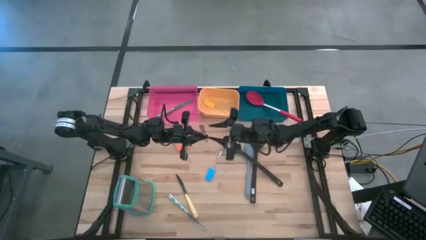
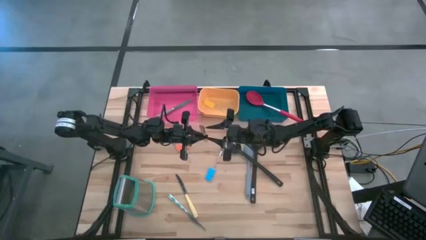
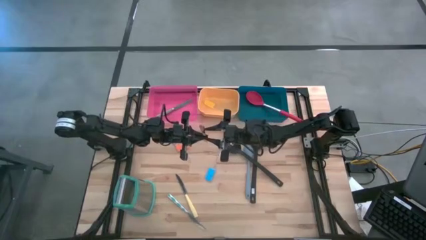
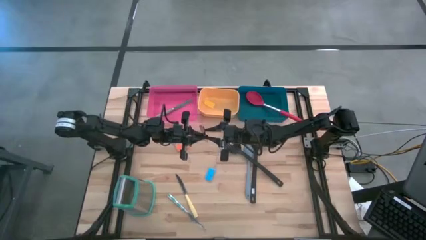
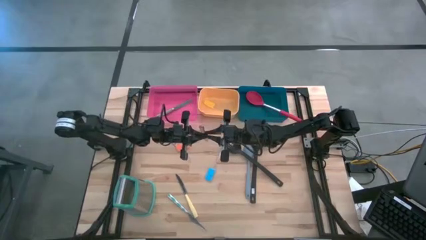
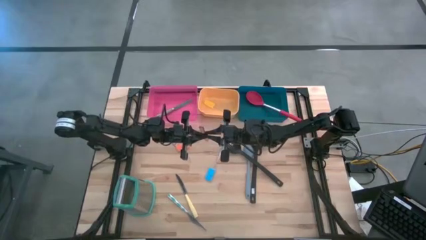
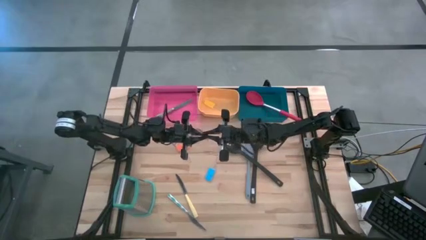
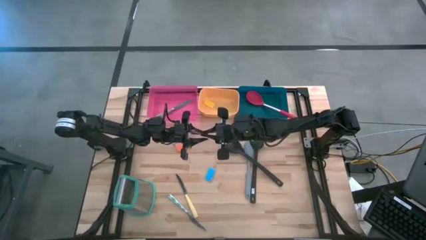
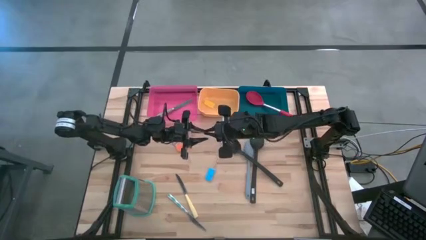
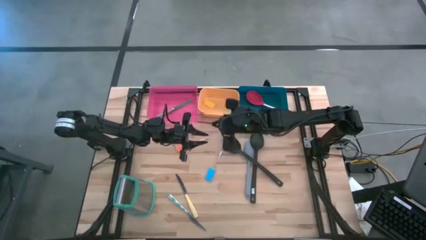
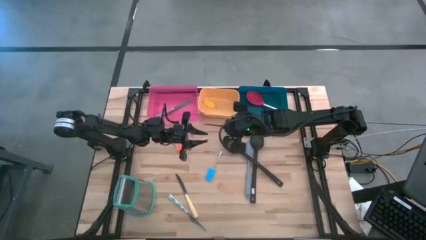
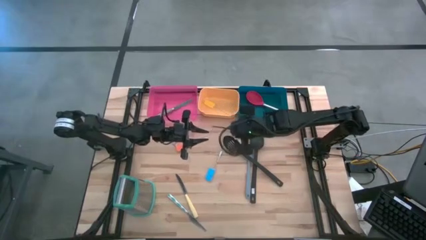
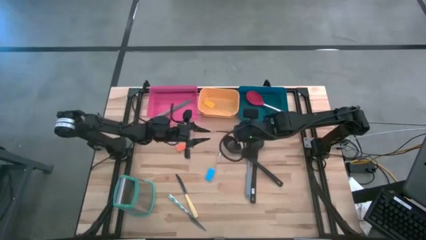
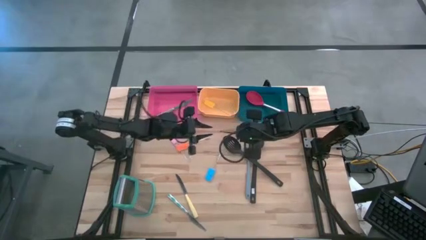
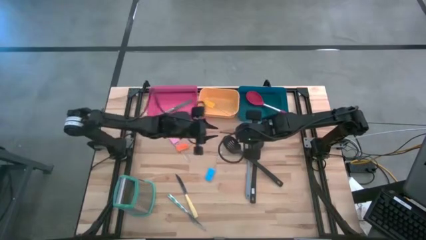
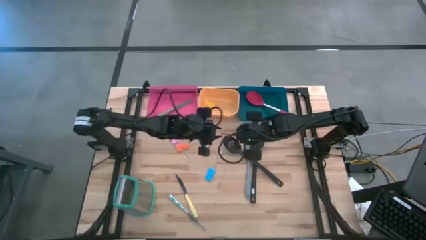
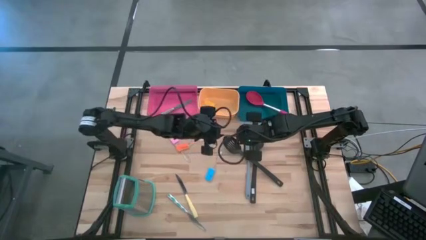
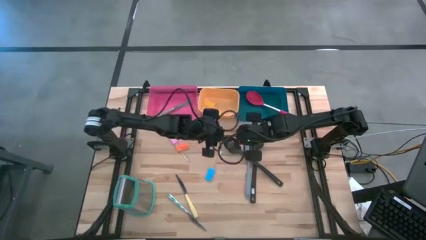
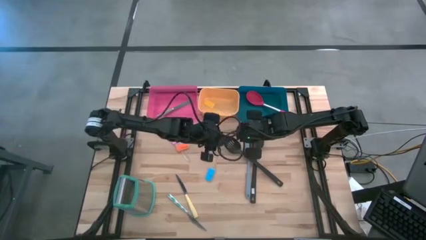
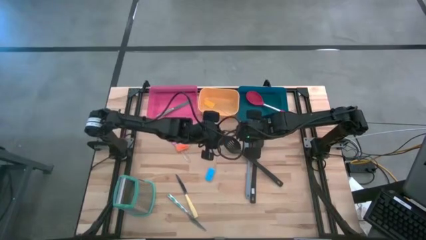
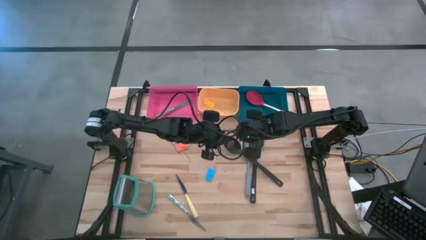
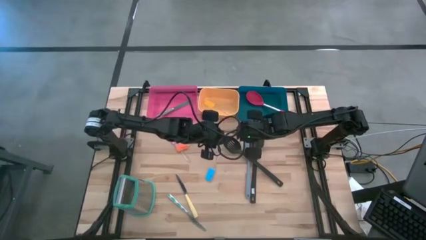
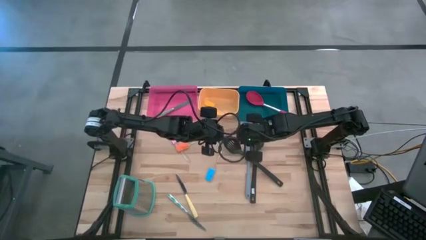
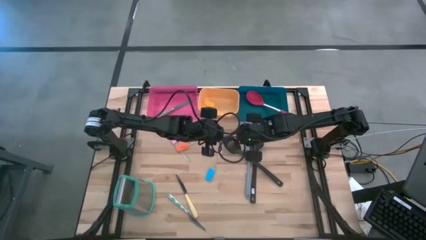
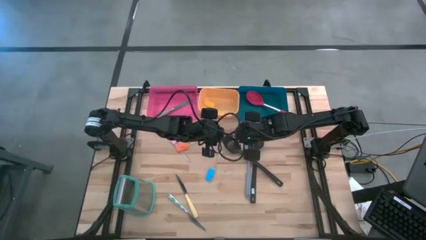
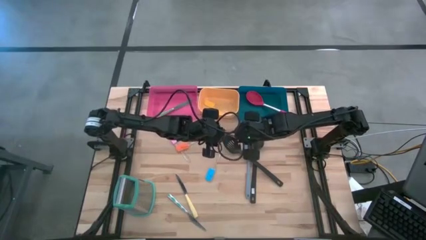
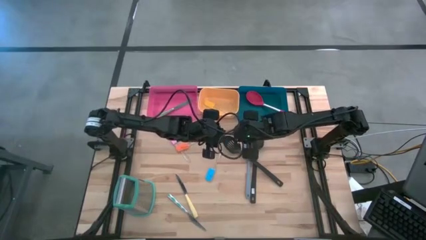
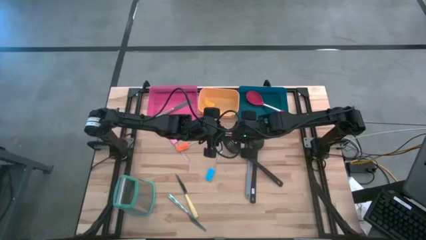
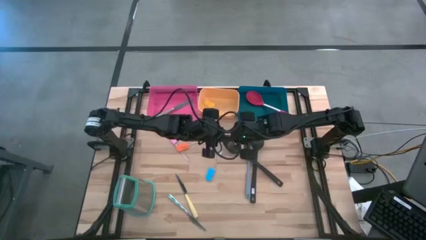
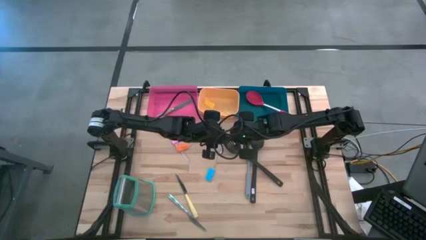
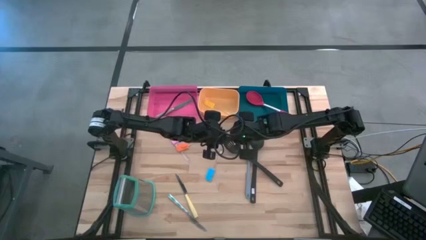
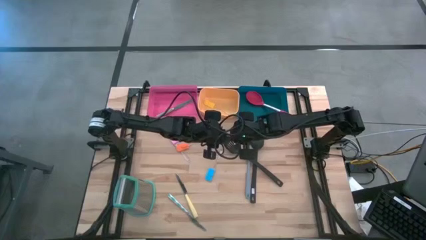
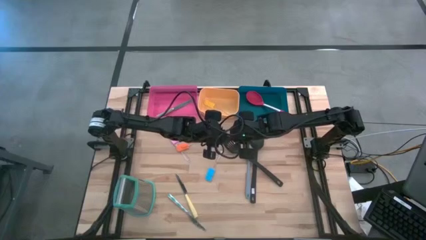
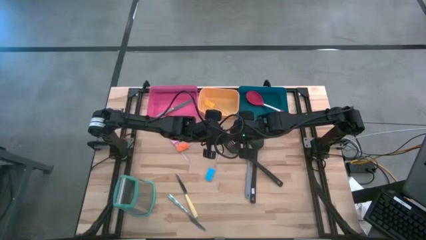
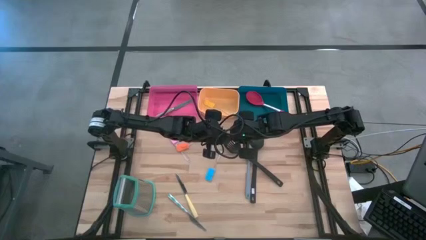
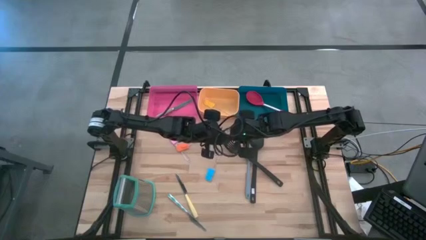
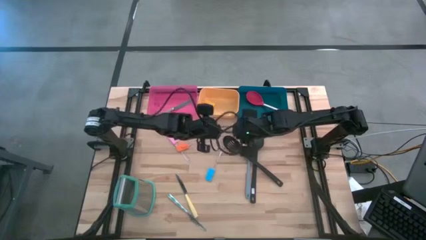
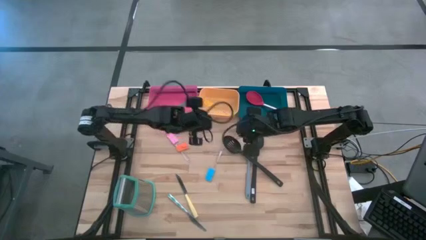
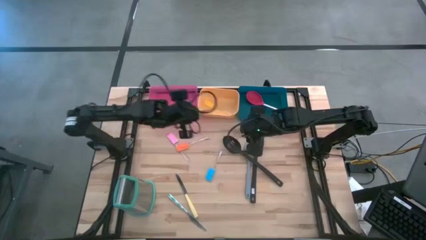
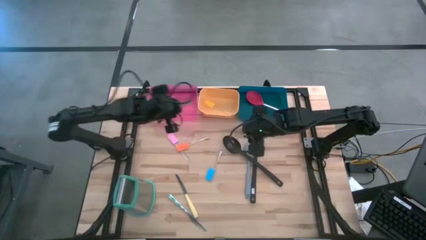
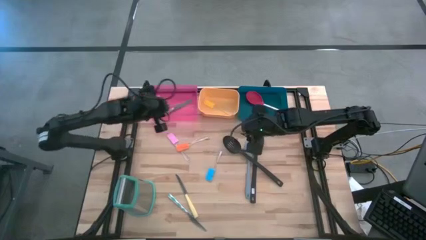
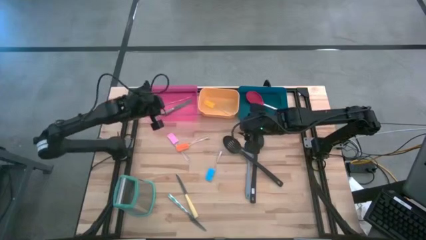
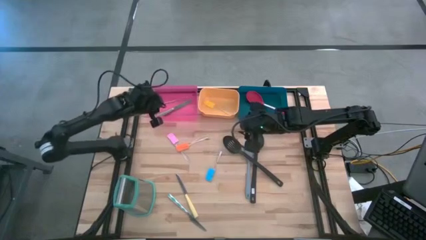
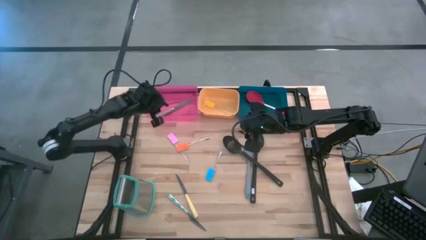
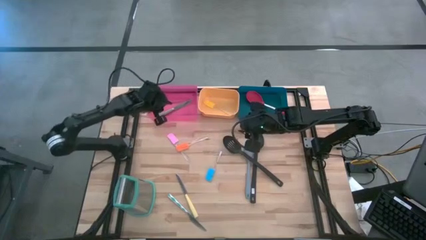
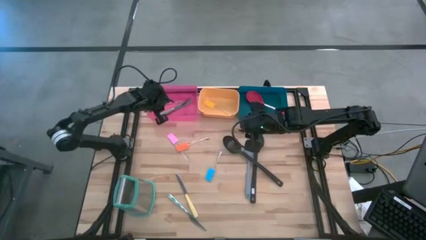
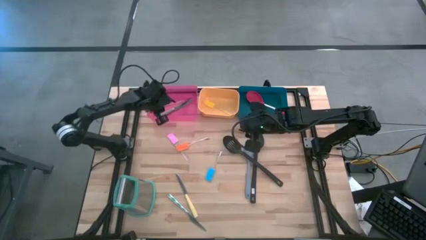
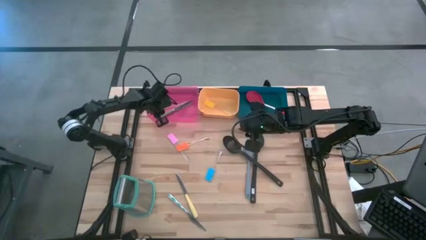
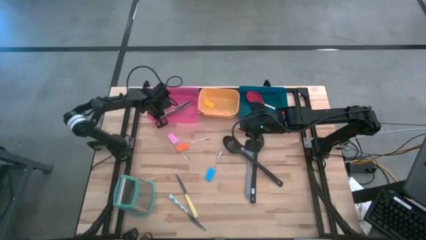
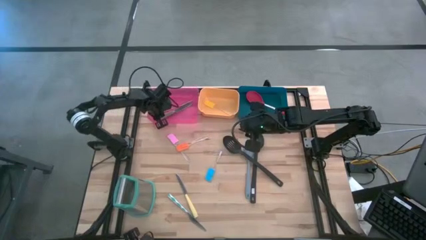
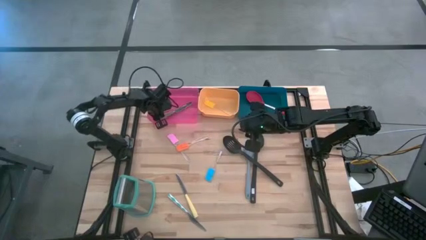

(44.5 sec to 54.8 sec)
Task: Pick & Place Kitchen Items
Put the brown knife into the red bin
